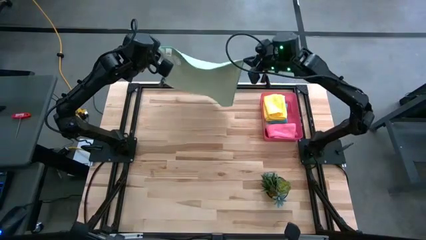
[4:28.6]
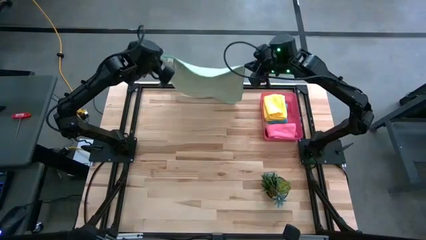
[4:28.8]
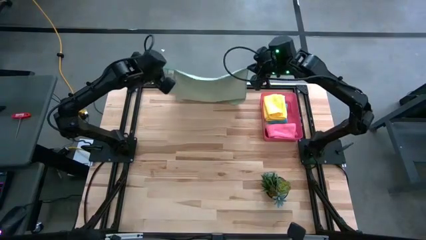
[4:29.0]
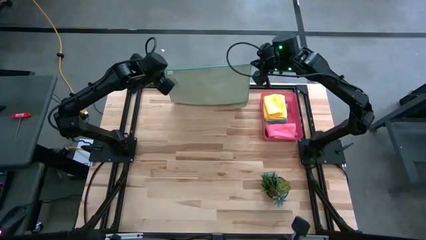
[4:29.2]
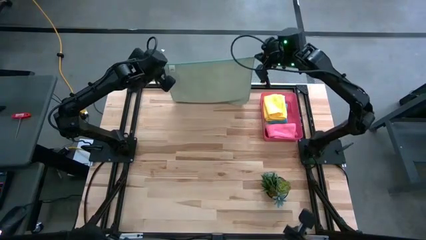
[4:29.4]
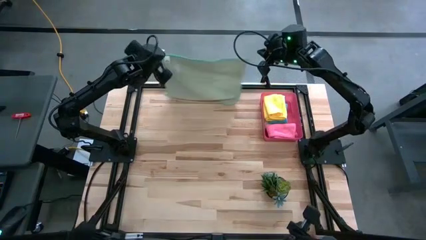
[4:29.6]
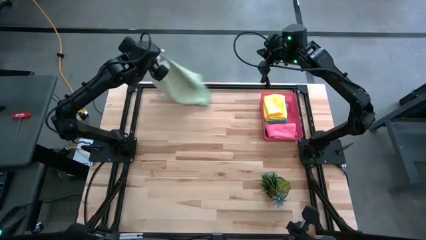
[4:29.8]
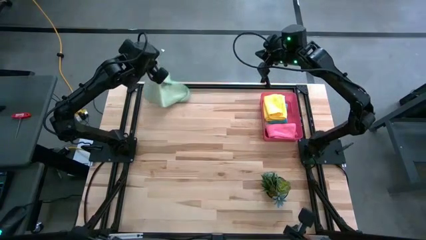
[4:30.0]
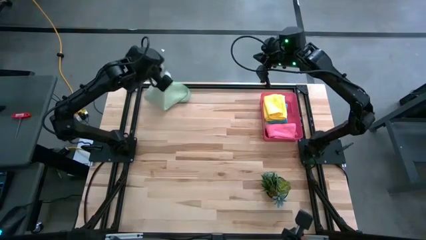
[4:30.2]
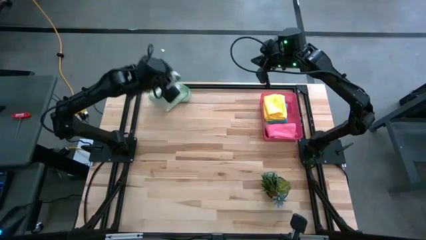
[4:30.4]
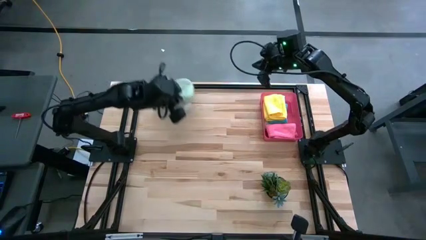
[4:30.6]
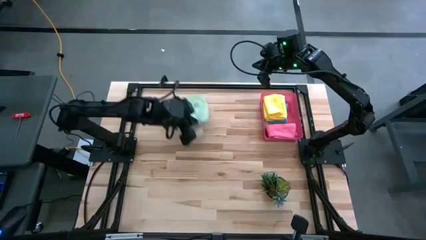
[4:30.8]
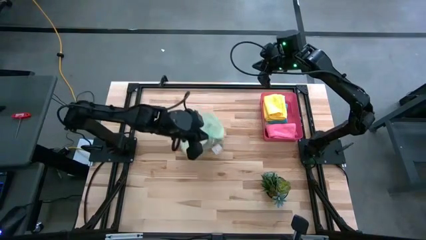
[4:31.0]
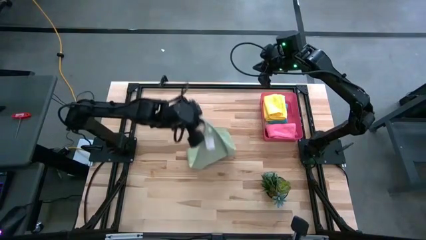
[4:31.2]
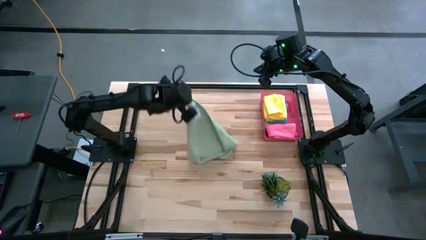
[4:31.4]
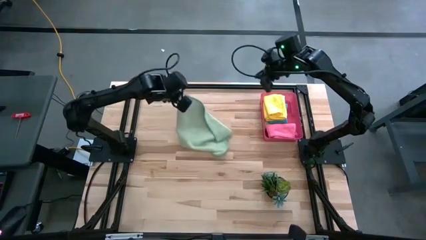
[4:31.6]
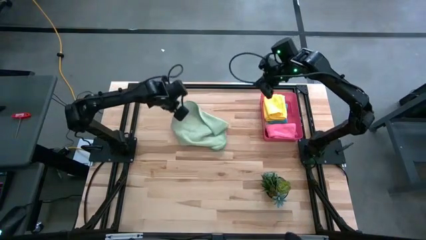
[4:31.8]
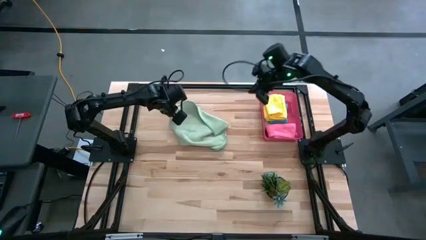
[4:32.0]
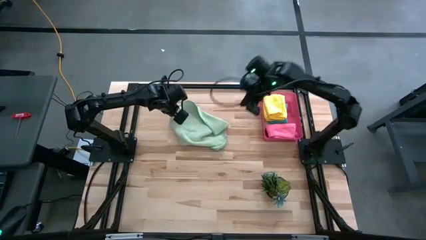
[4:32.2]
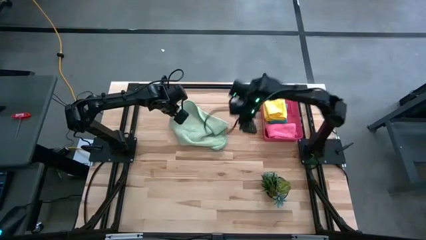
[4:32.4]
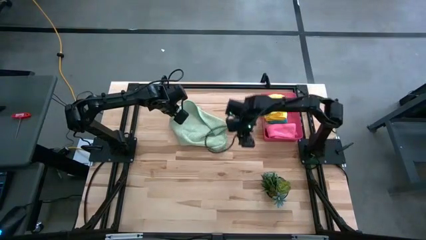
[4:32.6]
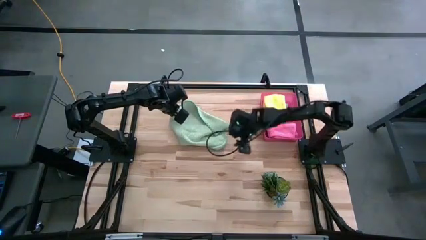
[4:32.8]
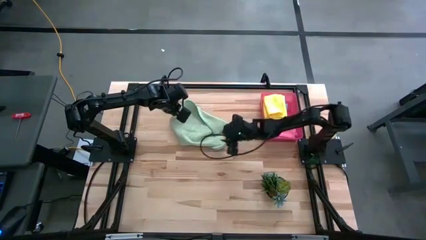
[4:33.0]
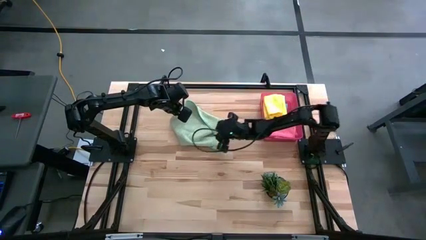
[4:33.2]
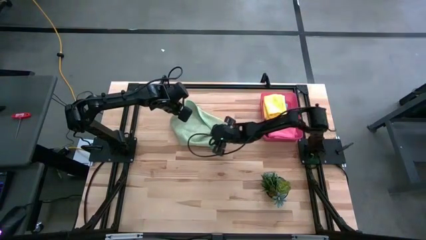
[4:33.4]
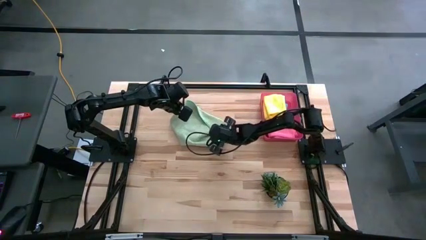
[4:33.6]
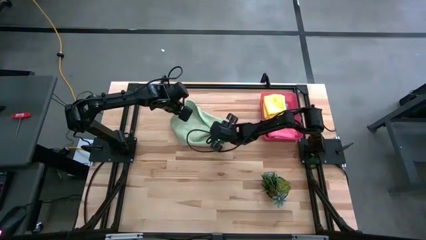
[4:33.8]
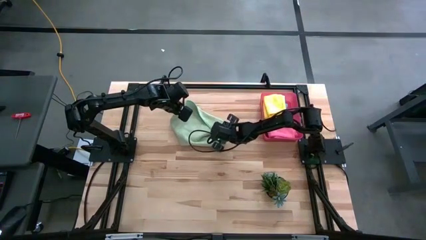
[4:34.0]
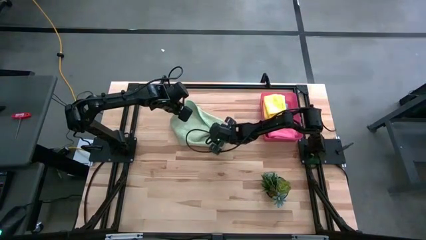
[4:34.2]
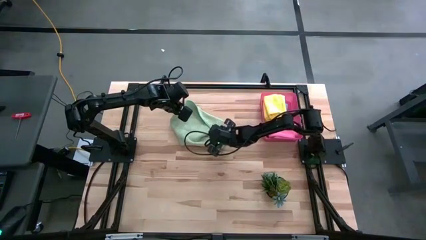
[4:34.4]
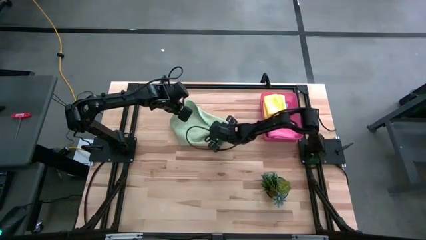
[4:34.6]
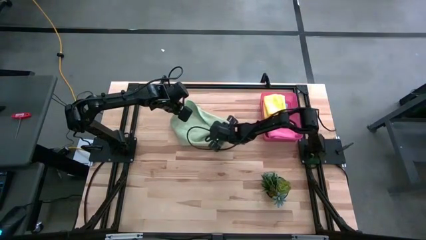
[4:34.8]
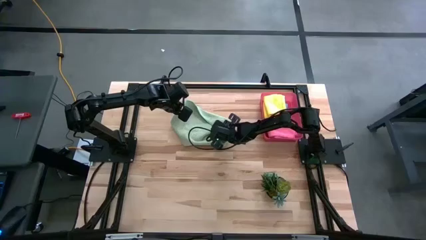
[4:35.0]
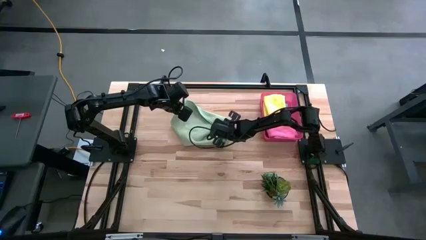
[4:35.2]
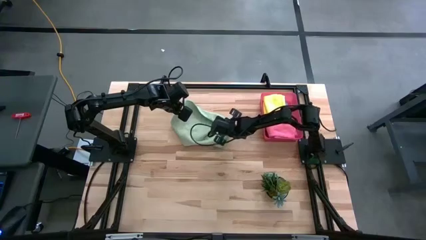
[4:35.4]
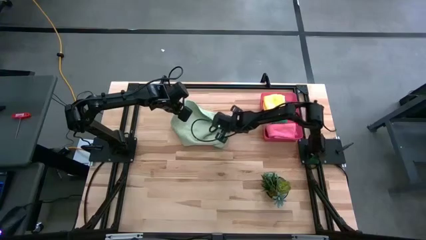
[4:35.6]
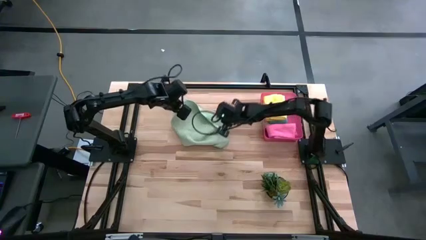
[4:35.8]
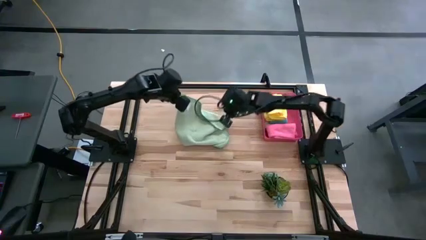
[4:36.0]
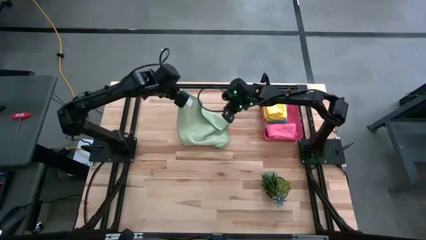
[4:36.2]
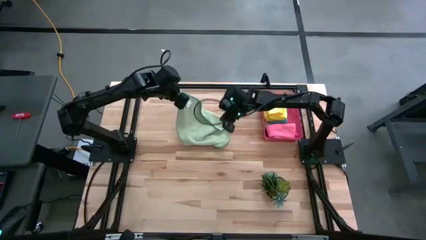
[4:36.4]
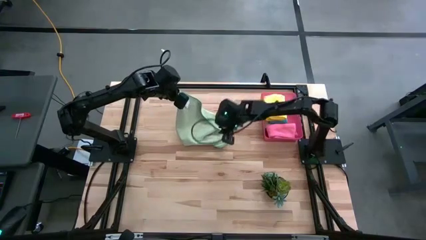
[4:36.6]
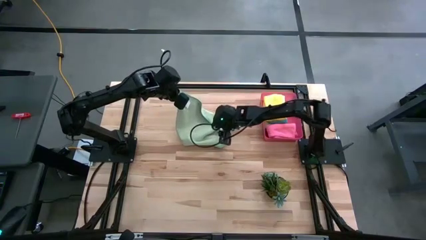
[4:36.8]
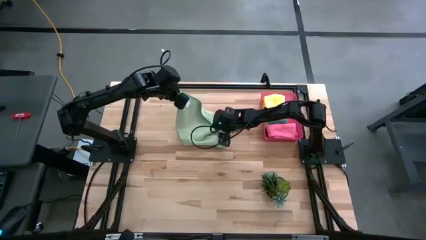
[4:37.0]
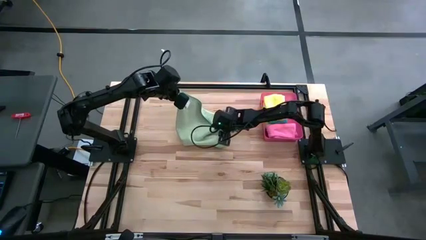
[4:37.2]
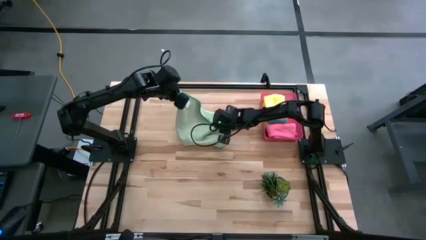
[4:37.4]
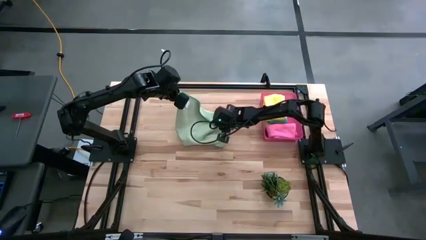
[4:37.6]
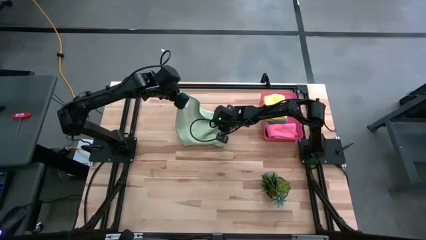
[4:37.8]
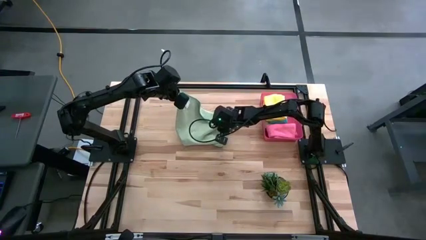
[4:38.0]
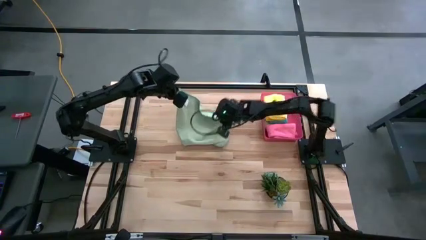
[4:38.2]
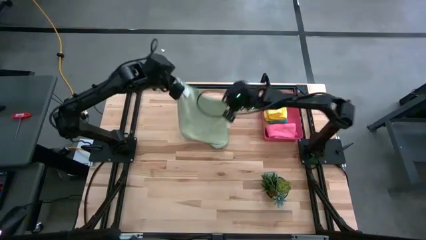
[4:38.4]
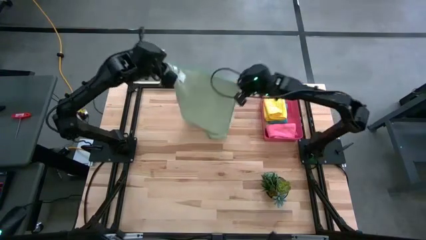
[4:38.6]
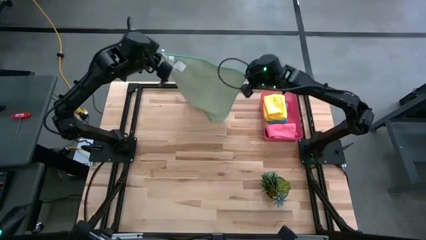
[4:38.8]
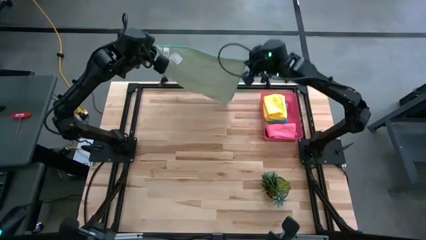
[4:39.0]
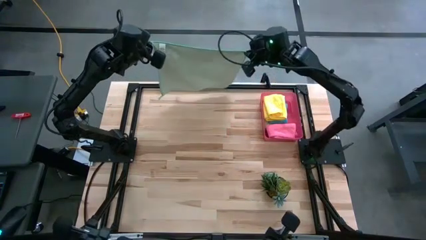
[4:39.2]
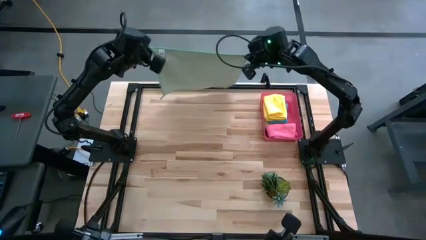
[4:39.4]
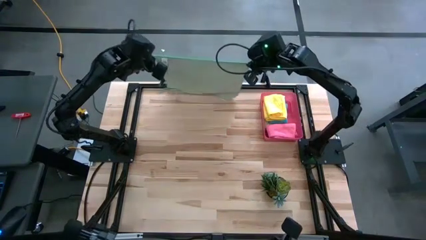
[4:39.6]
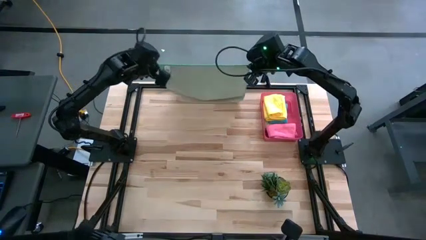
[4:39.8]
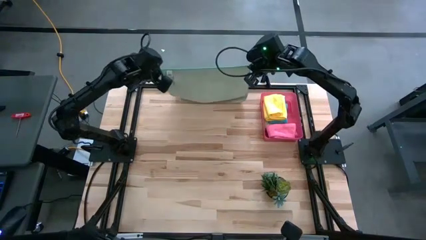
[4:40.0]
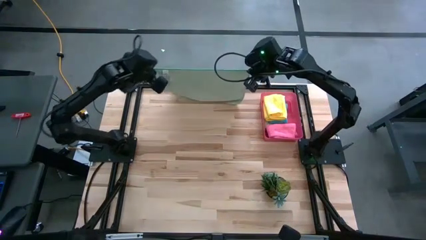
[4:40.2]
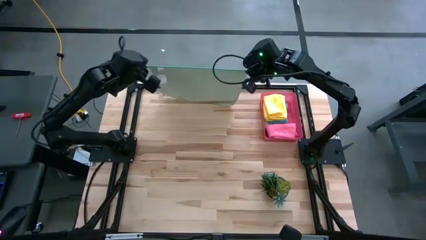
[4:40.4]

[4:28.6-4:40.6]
Task: Fold microfiber towels
Fold the light green microfiber cloth

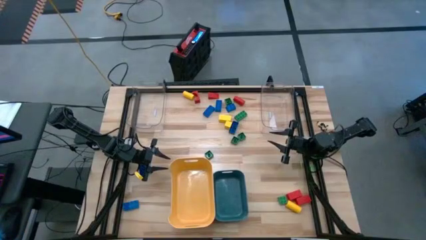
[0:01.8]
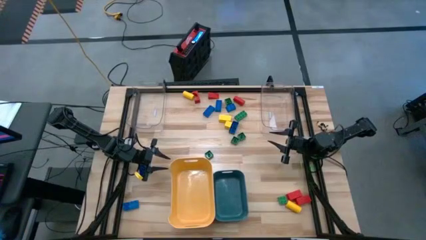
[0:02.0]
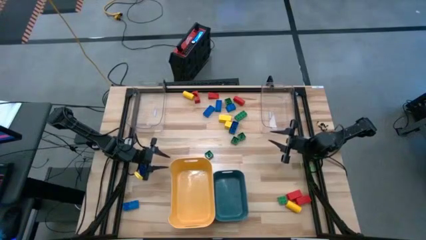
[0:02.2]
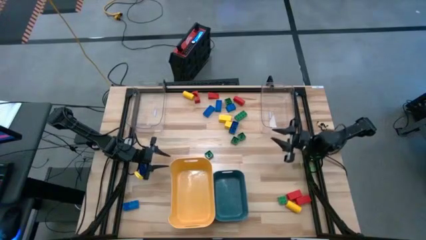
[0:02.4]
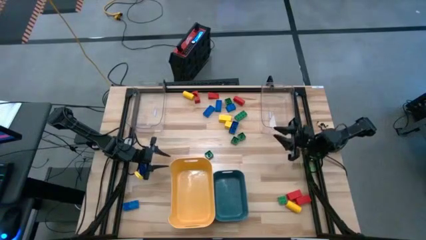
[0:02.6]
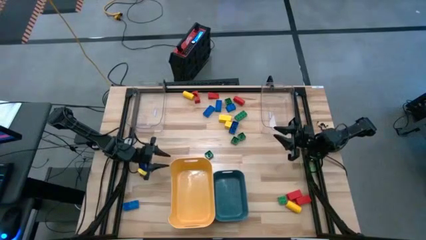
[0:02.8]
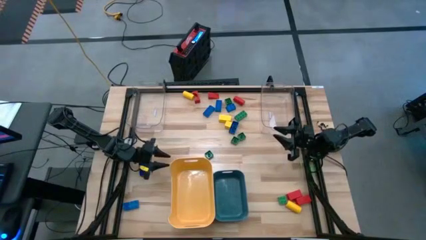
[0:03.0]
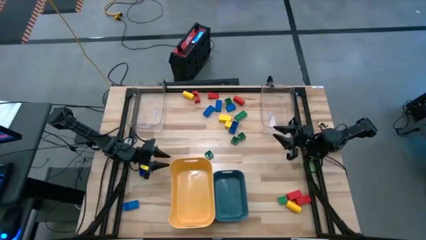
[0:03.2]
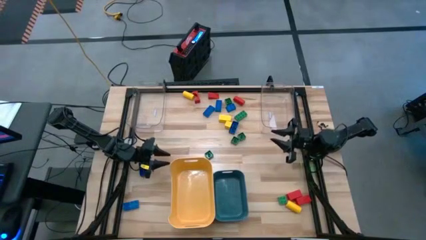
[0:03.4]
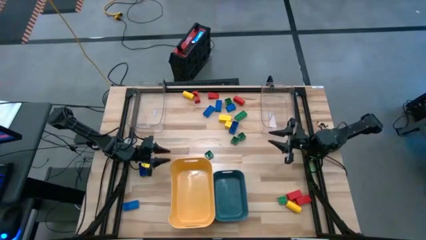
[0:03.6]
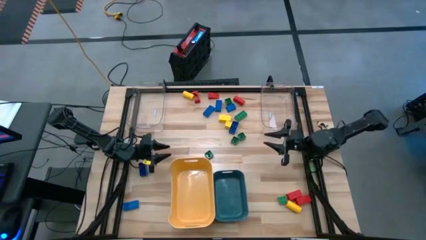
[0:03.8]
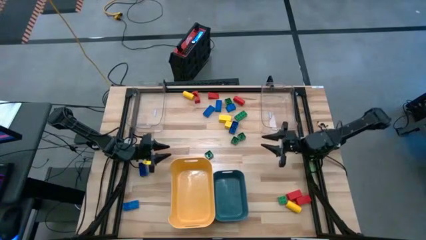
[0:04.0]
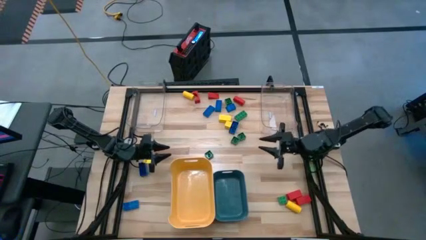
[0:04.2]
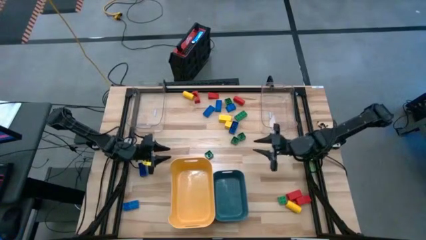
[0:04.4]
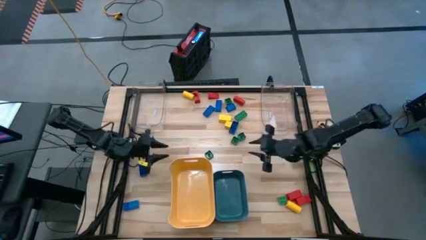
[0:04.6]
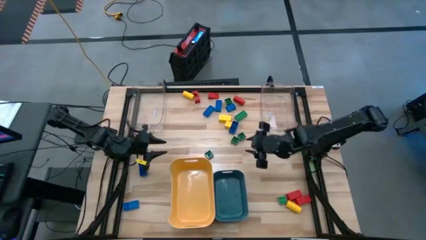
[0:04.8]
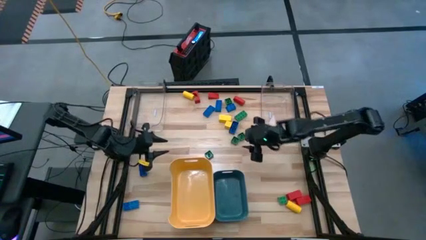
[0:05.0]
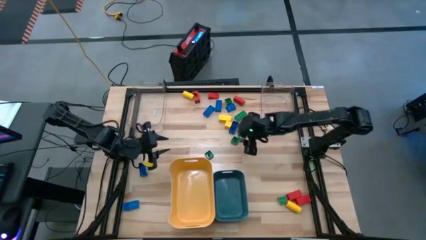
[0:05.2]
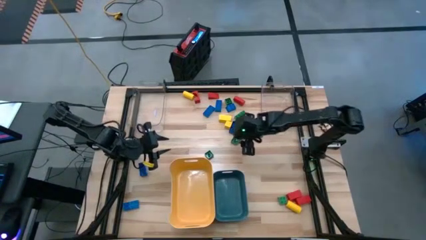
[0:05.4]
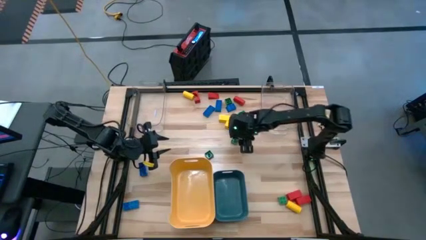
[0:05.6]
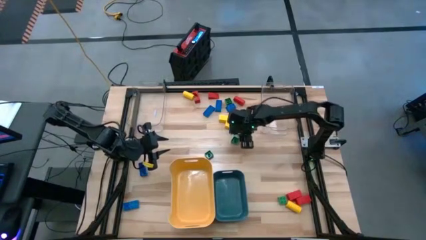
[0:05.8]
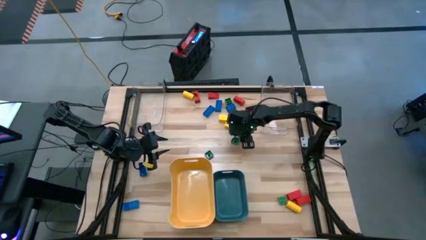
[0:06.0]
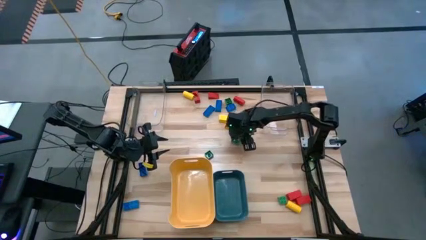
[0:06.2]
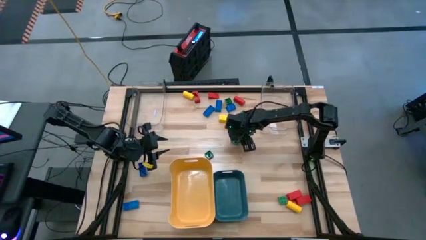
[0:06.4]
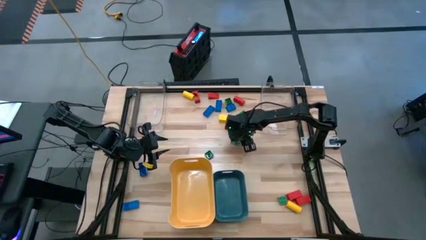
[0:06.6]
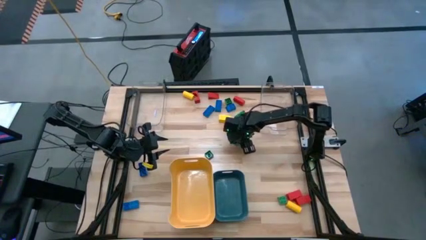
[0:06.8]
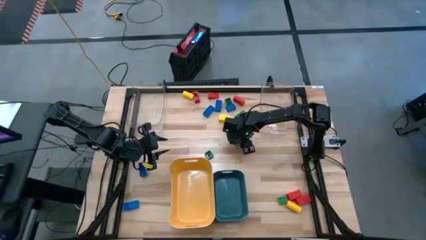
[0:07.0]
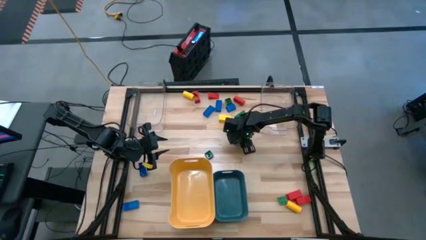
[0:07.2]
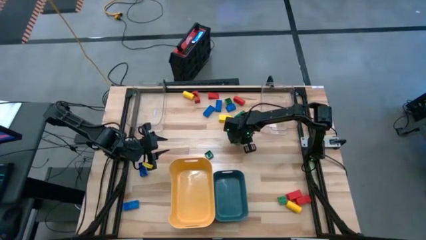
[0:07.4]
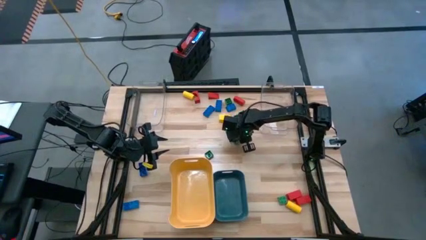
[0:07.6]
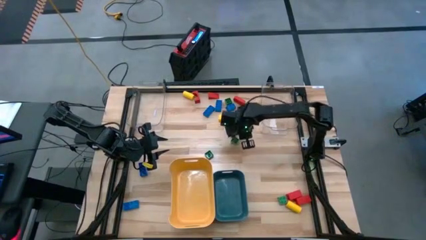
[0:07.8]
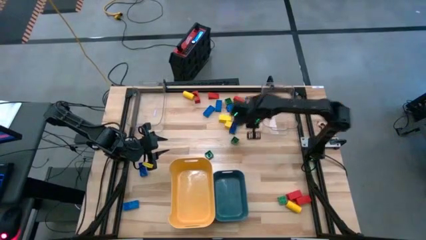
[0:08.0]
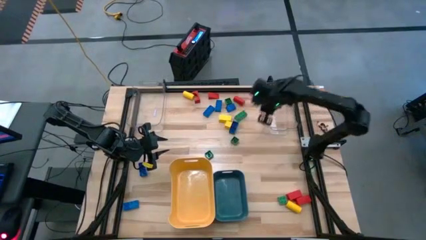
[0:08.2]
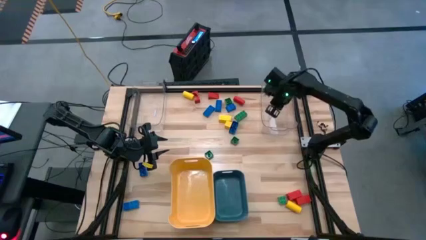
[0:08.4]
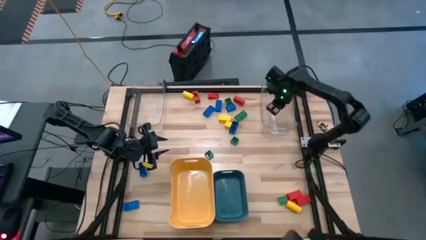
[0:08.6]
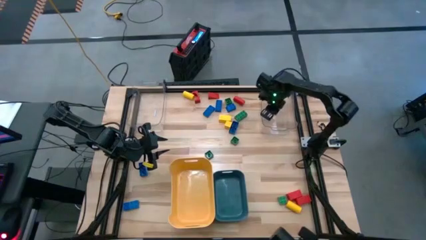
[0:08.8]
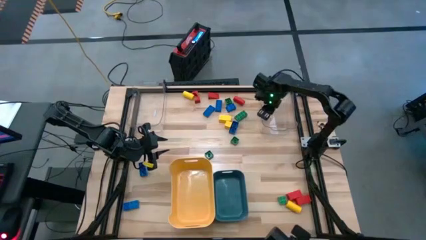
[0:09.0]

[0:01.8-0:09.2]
Task: Sort blocks
Put the green game piece into the right transparent bin
